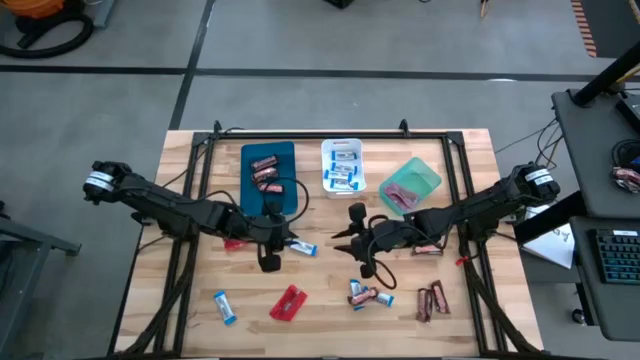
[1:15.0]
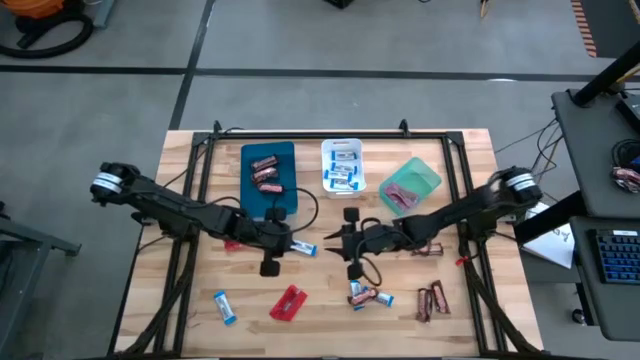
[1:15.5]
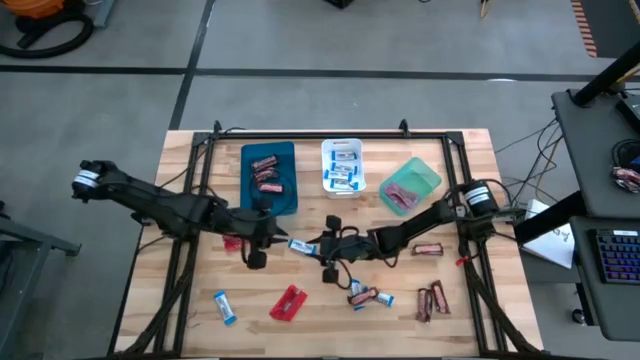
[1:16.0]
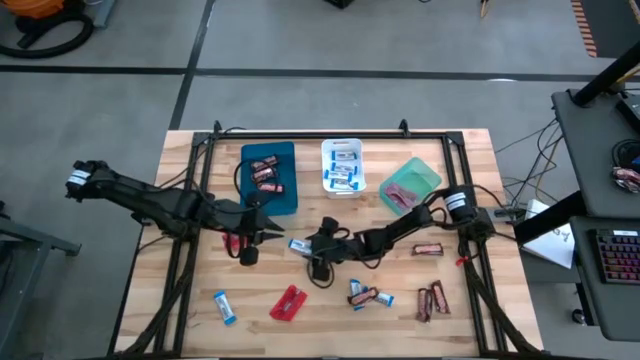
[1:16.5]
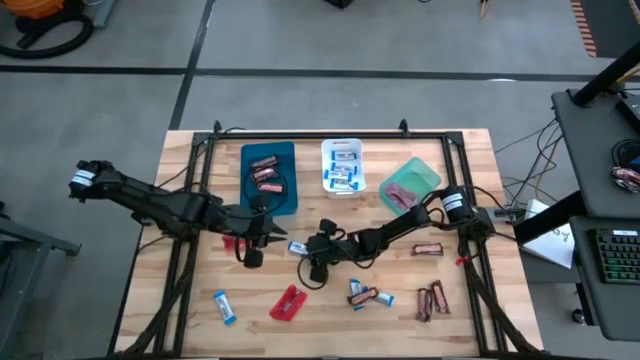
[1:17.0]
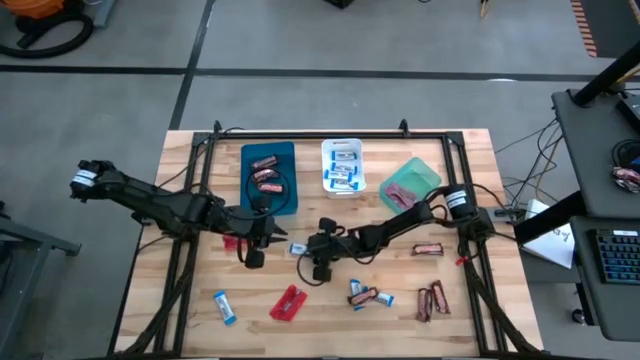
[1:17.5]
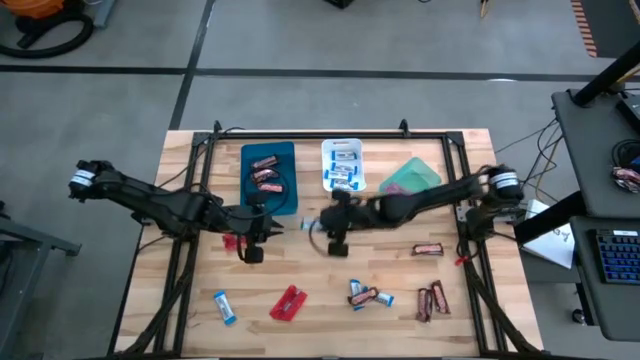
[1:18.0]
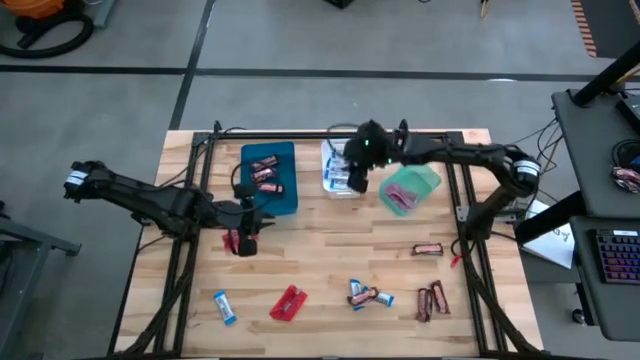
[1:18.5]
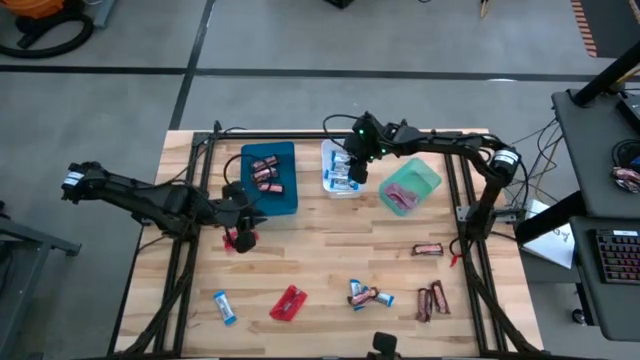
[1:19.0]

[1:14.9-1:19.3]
Task: Sort candy
Put the white chocolate into the white bin

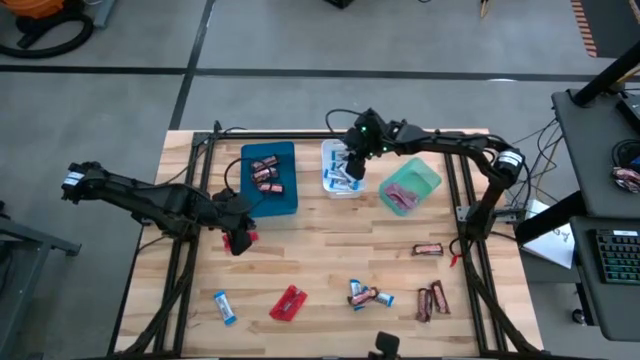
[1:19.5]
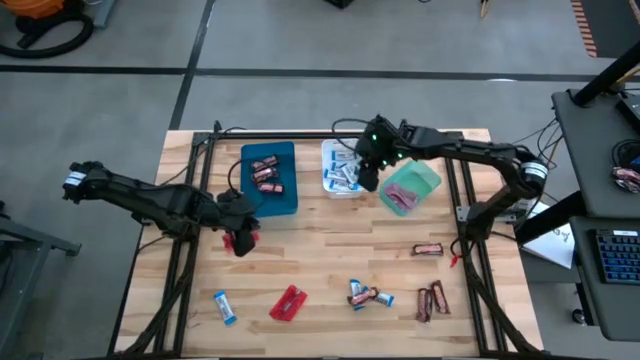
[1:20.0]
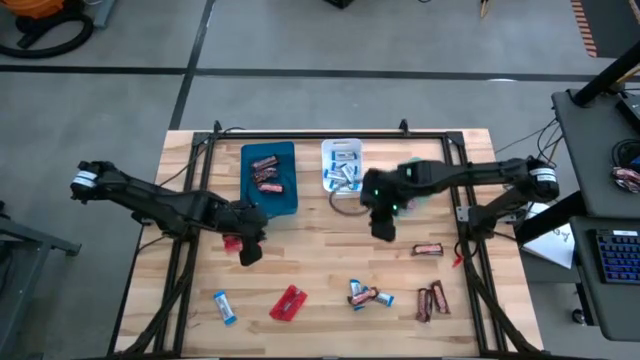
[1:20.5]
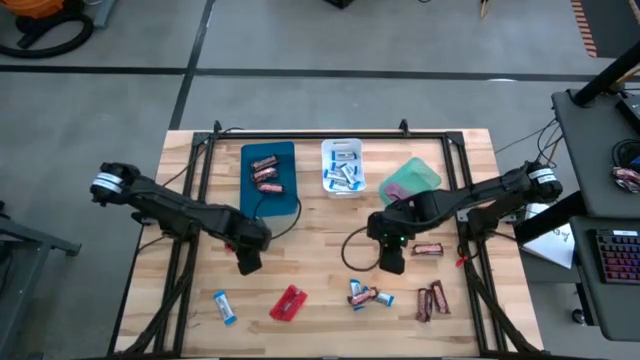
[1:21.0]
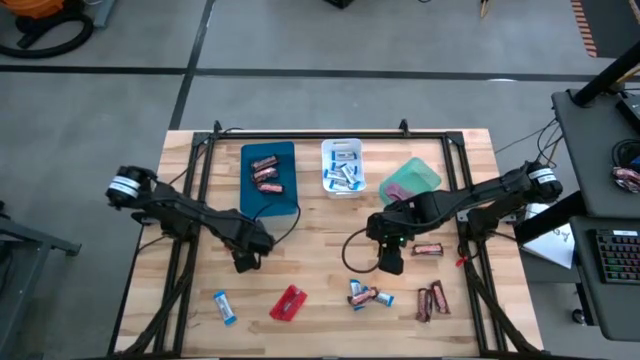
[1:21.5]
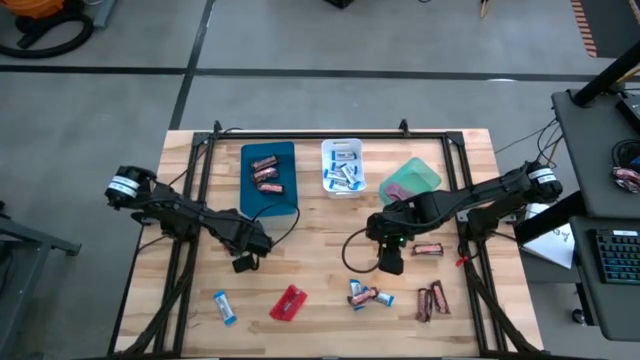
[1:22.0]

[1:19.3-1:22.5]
Put the red candy into the green bin

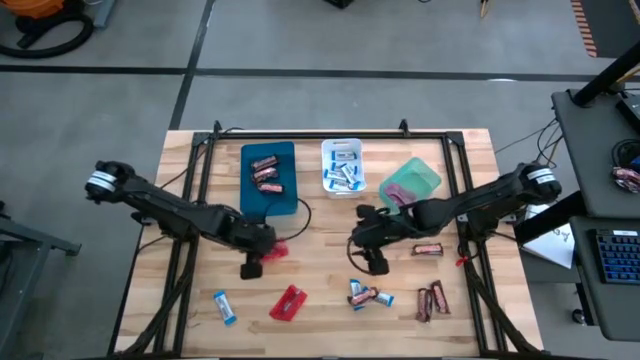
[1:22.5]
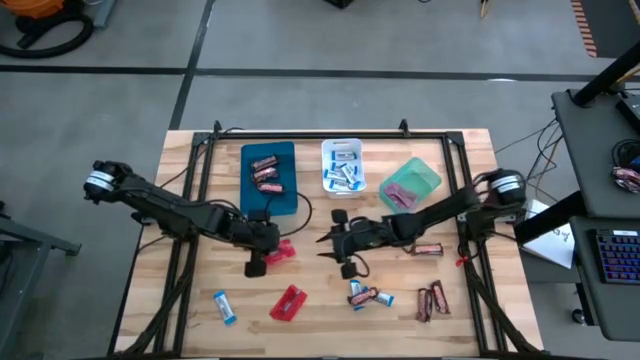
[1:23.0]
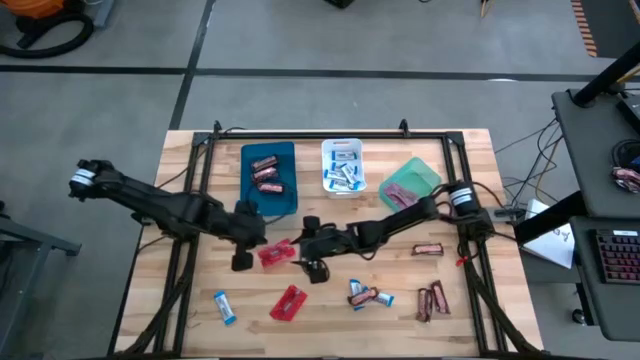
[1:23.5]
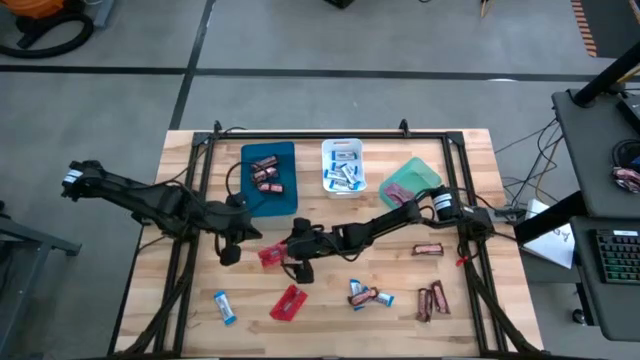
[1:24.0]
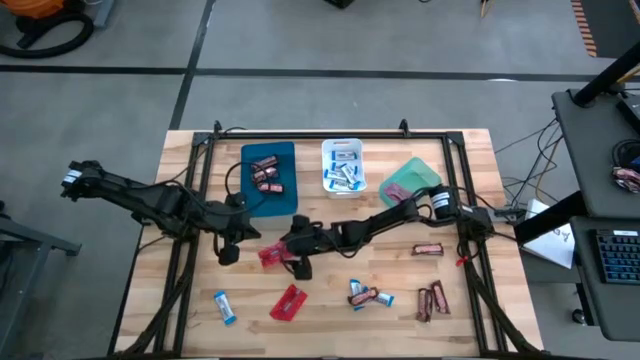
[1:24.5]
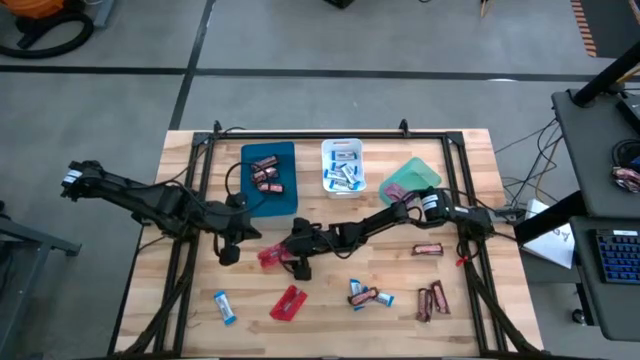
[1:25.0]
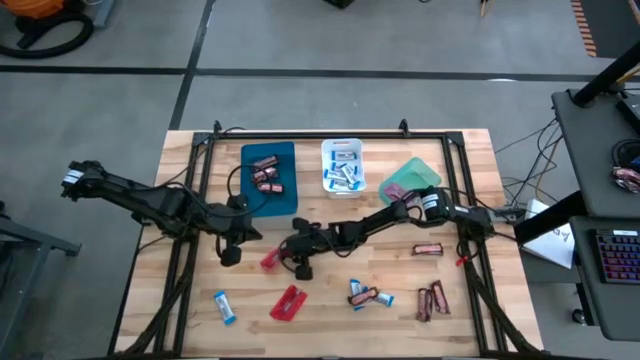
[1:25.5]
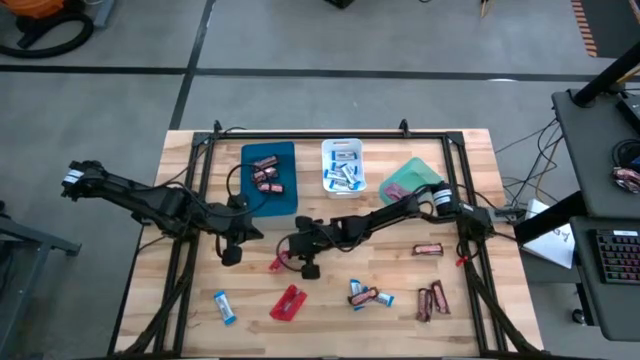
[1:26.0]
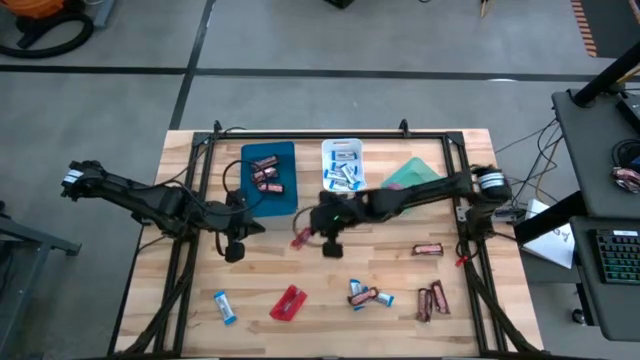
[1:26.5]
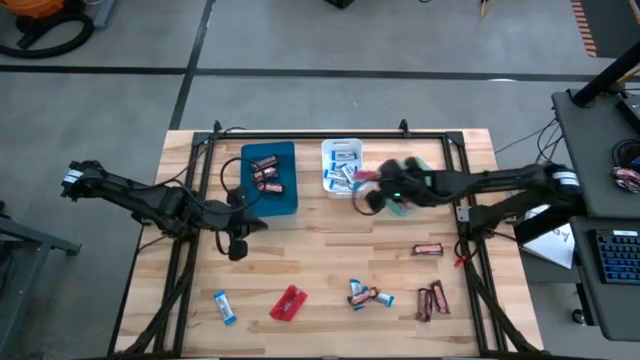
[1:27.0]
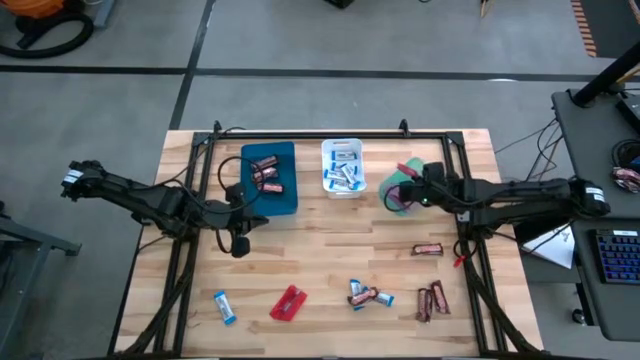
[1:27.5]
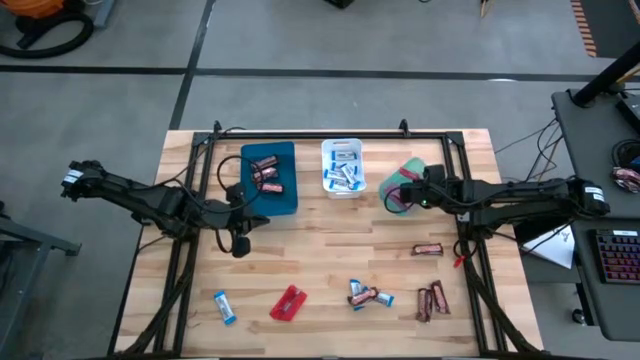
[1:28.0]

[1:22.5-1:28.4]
Put the red candy into the green bin

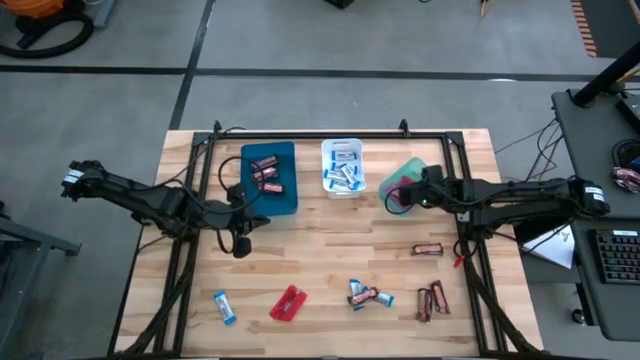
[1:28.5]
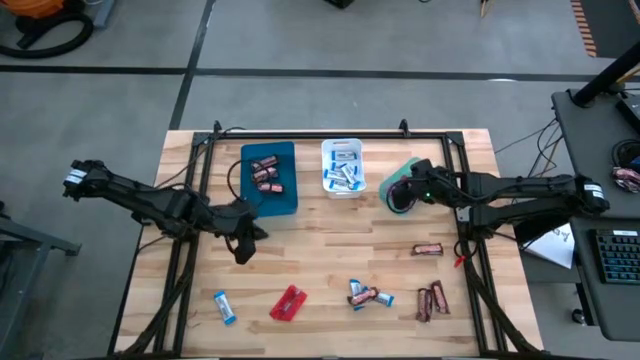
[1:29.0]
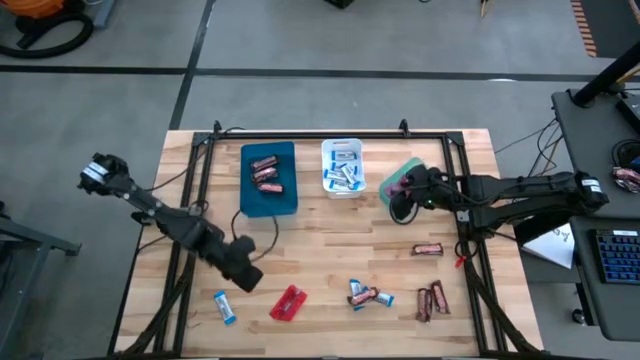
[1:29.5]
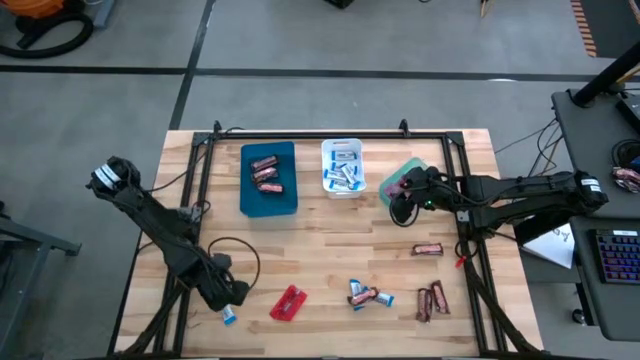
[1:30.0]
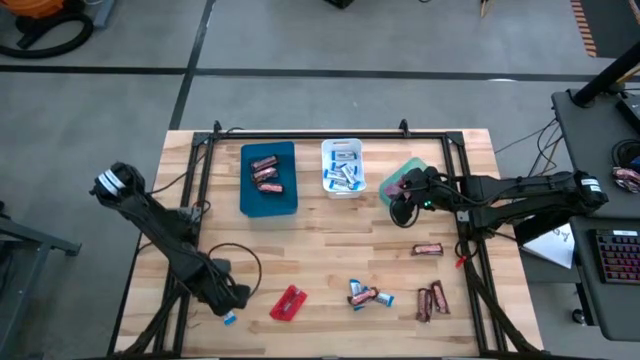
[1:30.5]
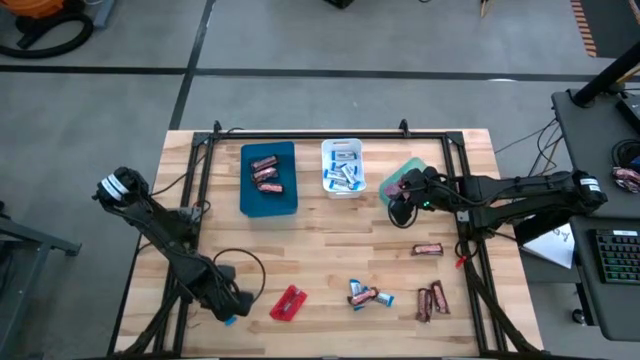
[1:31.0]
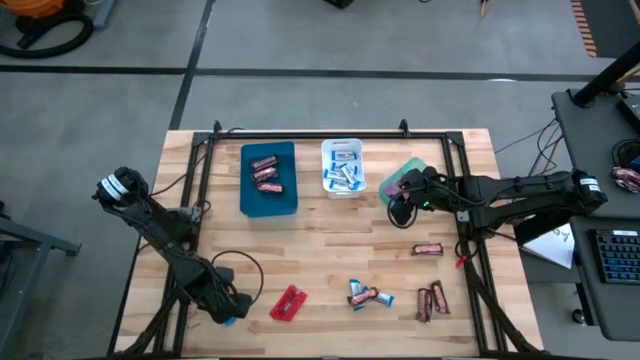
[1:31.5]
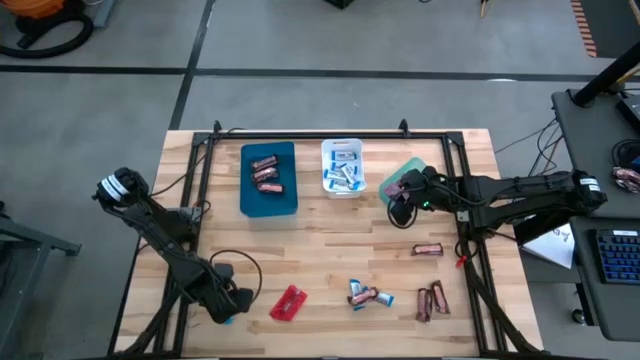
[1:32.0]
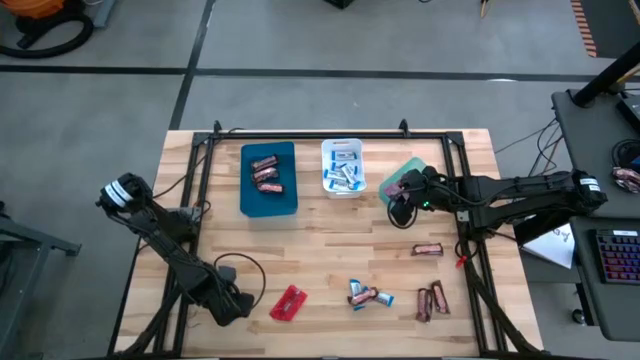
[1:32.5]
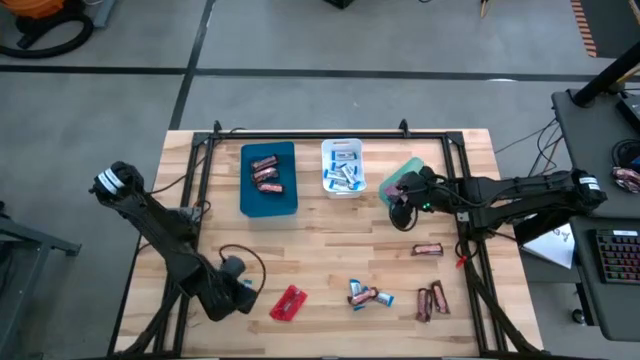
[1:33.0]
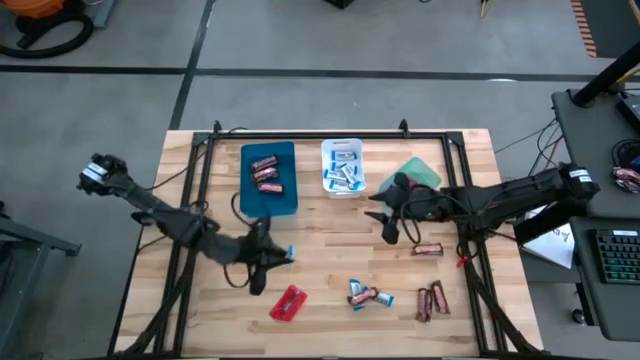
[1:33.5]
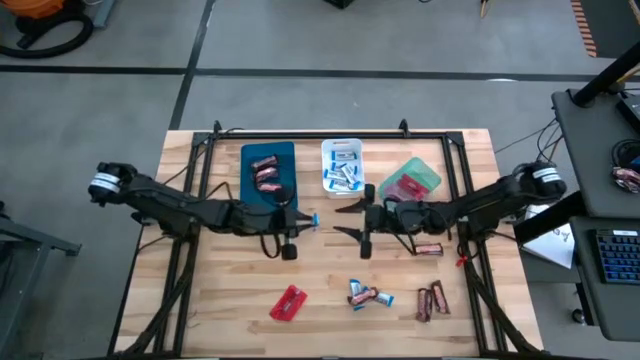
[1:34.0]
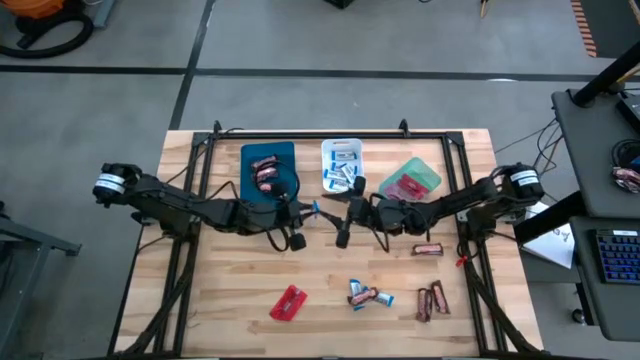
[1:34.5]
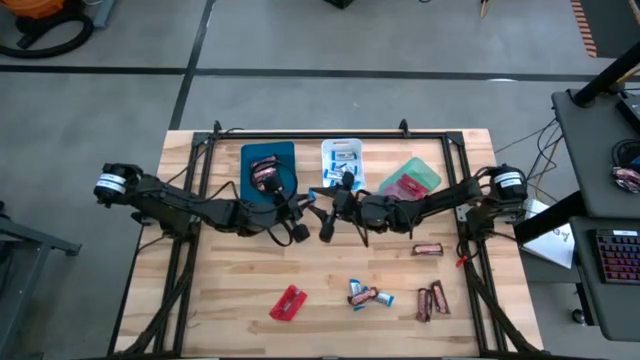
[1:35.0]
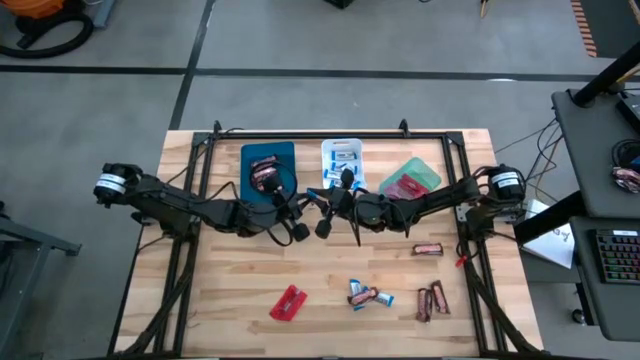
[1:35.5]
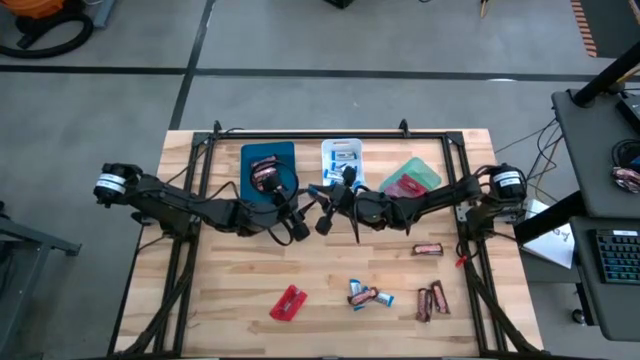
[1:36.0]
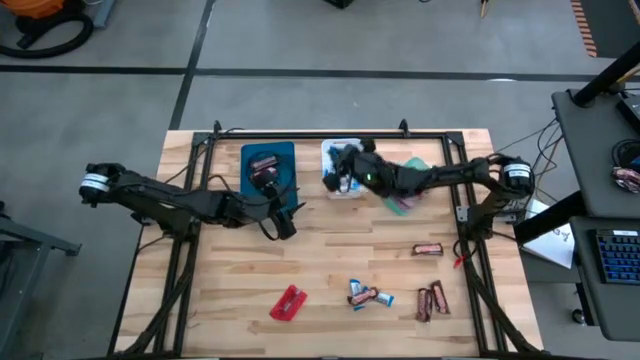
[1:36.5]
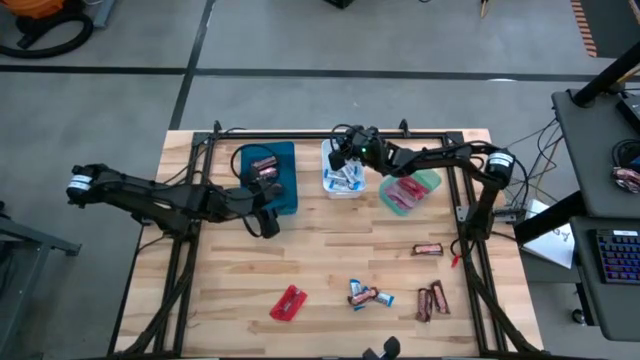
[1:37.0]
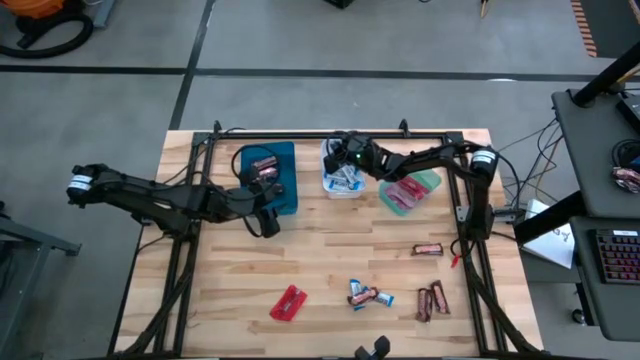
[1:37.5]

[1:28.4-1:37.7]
Put the white chocolate into the white bin
